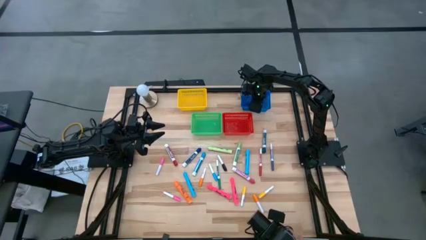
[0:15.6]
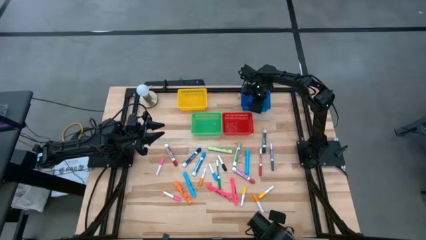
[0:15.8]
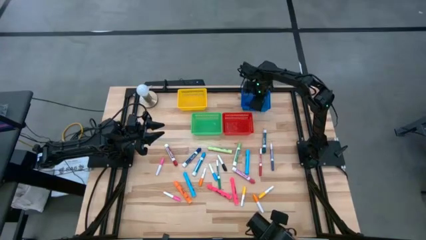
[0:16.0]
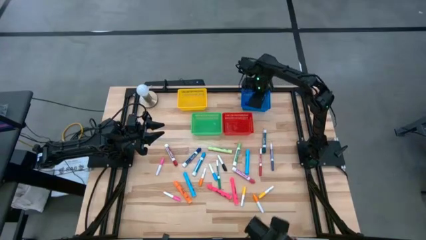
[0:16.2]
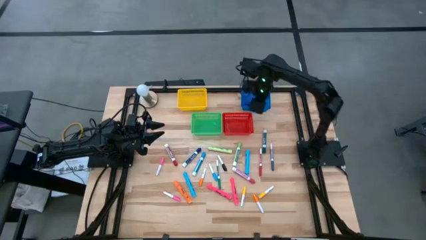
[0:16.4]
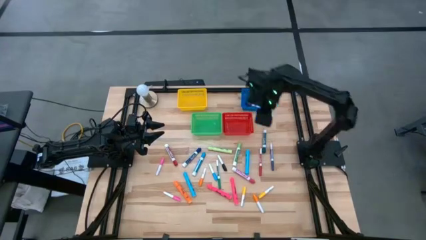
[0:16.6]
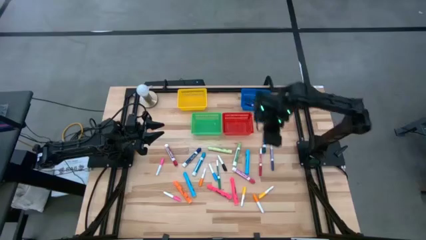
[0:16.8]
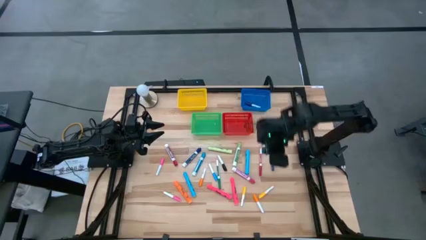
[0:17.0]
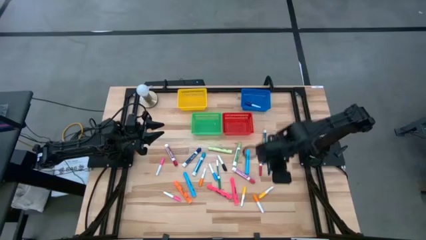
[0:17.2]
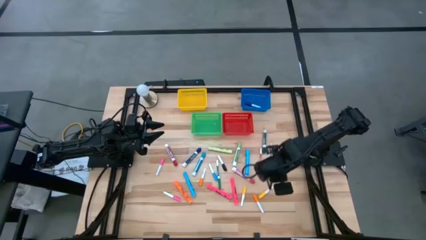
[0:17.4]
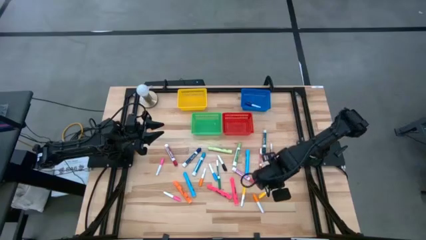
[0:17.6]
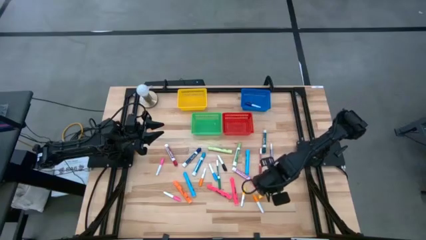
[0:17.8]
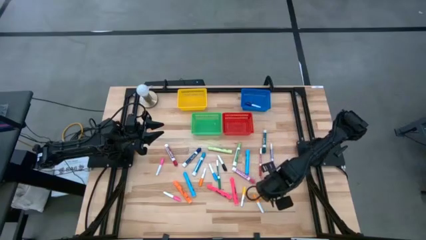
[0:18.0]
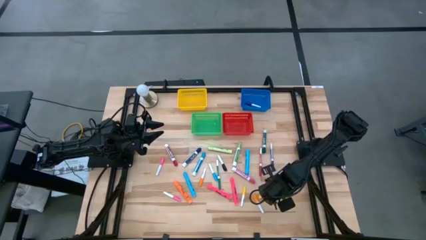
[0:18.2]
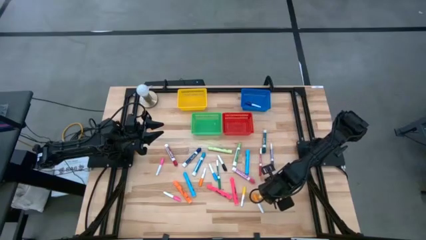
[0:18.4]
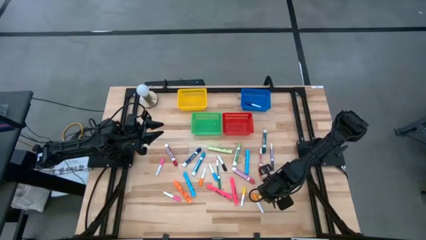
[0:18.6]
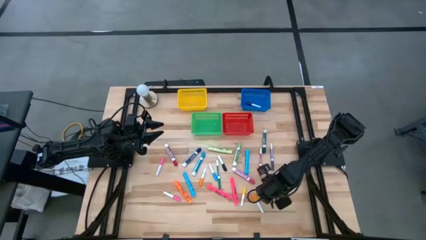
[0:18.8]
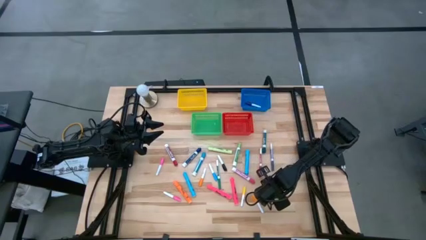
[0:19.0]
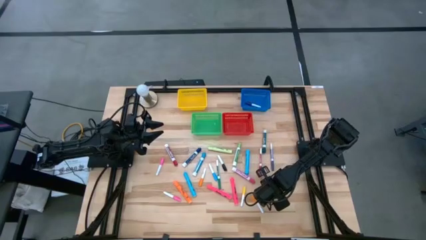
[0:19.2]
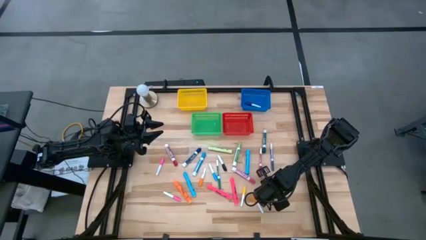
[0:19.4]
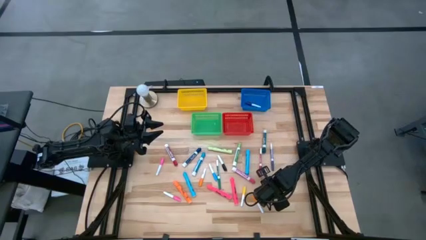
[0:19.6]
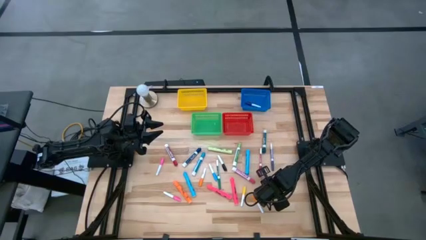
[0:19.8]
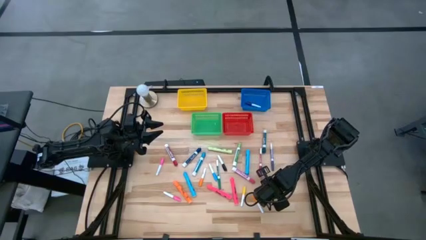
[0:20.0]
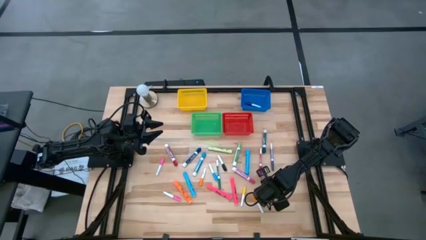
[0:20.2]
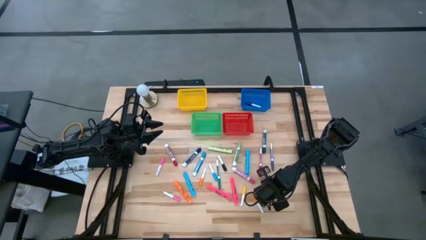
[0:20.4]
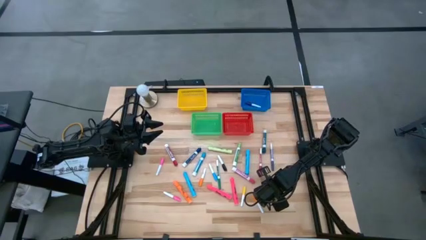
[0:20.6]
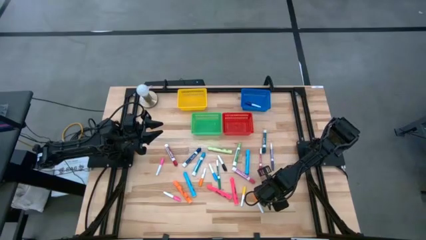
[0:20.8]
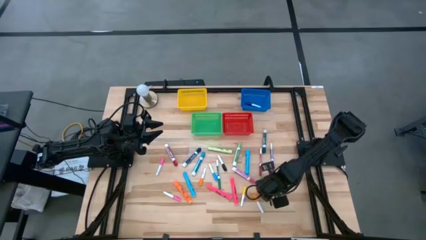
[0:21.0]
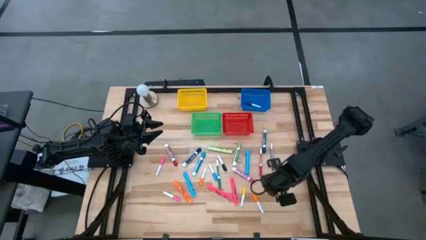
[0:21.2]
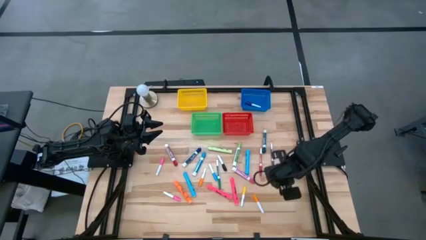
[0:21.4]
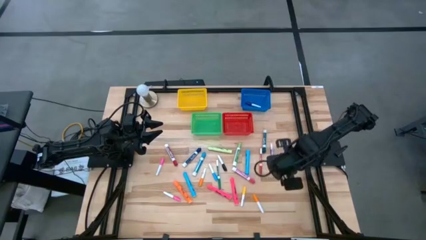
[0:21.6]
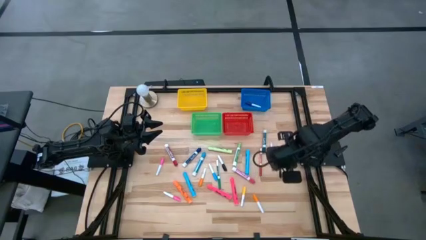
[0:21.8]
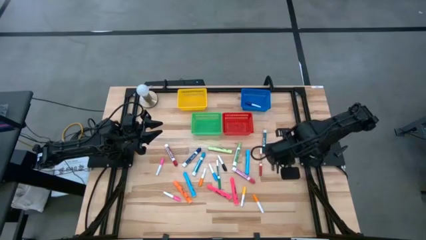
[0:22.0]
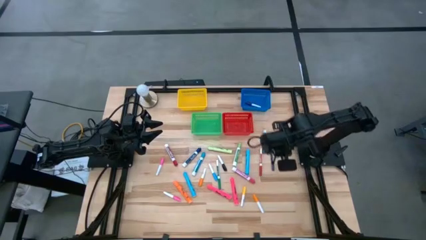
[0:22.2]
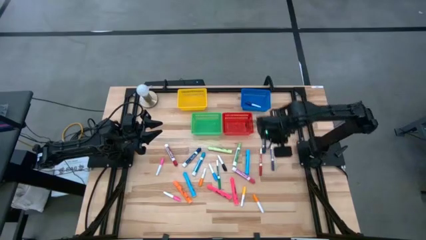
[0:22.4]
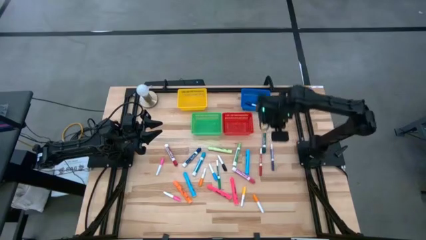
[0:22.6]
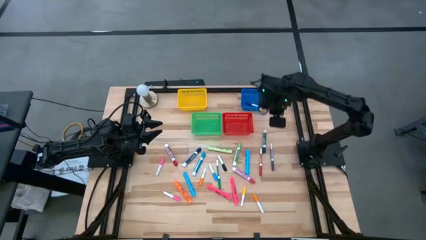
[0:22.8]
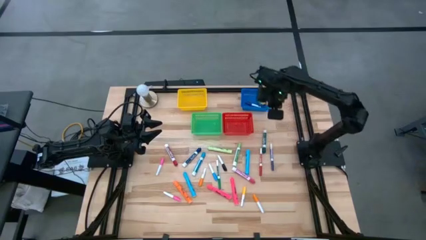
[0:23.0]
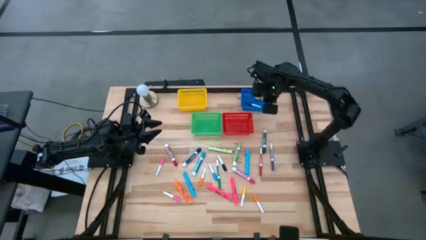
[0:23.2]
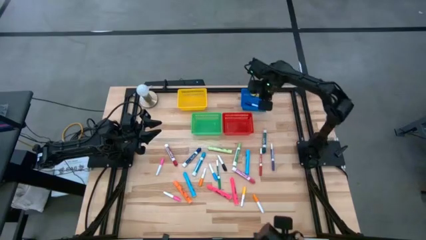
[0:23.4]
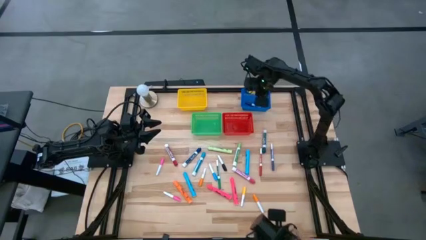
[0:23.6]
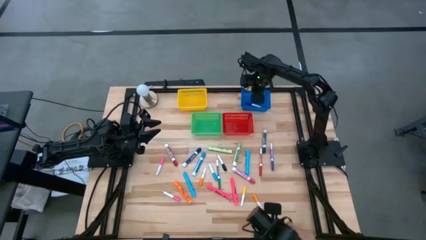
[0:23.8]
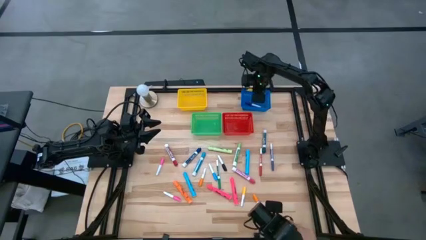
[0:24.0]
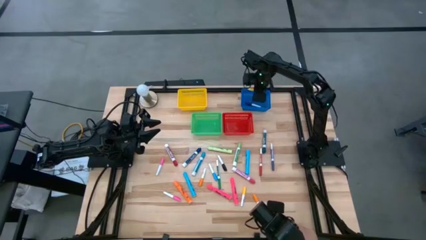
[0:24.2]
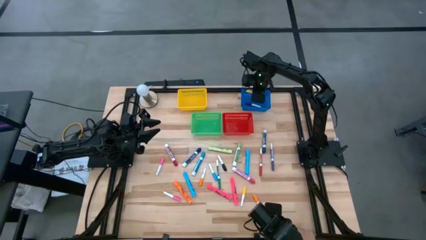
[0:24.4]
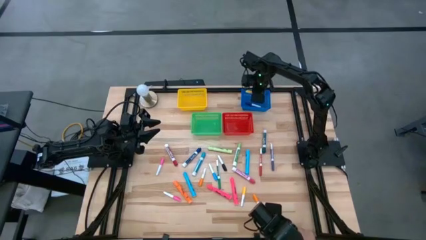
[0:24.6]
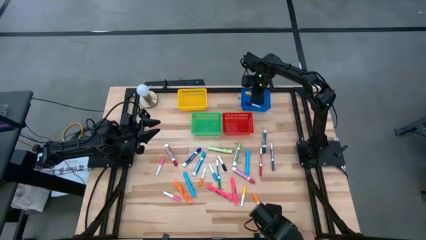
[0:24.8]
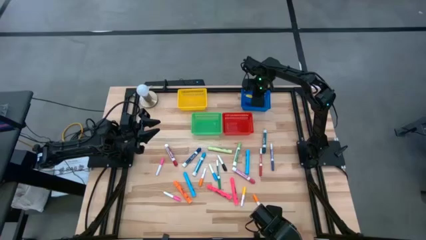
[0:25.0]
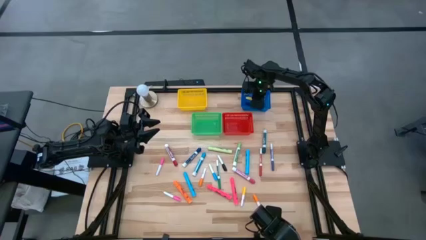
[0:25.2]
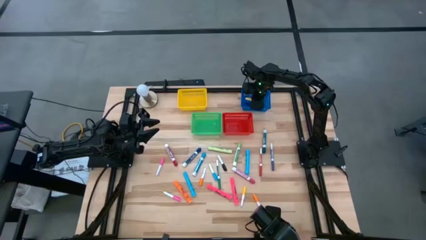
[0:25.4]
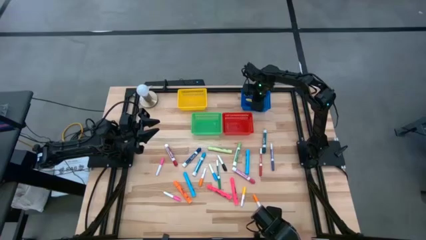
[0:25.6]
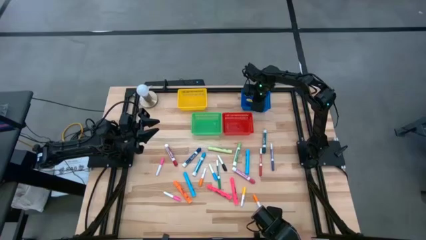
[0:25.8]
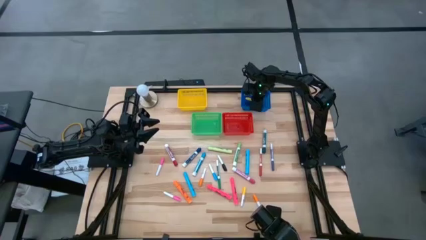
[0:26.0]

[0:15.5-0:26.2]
Task: Pick & Place Markers
Put the yellow highlighter into the blue bin
